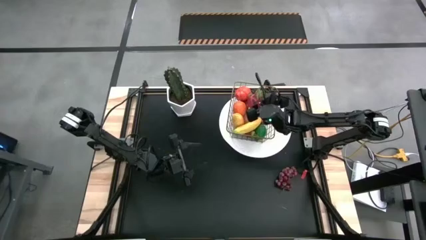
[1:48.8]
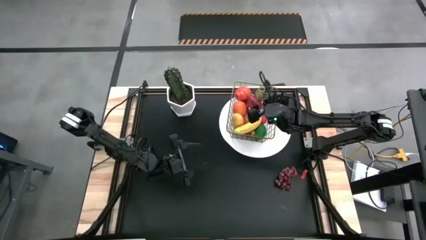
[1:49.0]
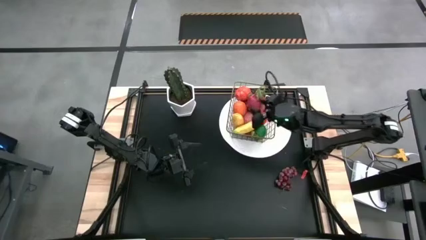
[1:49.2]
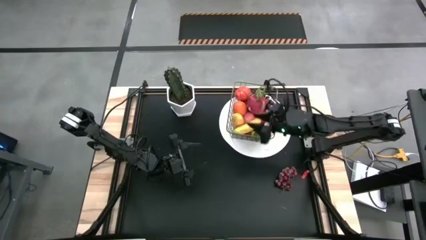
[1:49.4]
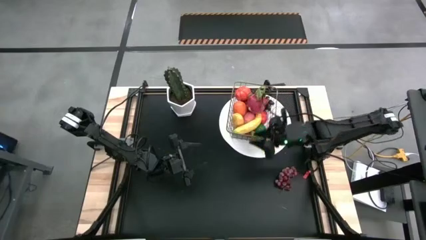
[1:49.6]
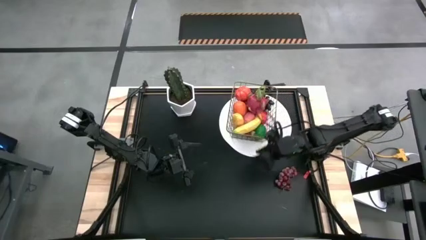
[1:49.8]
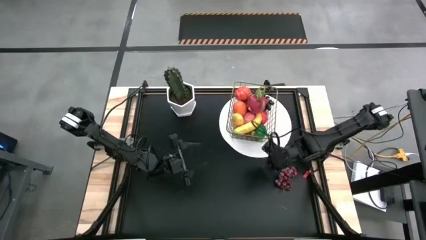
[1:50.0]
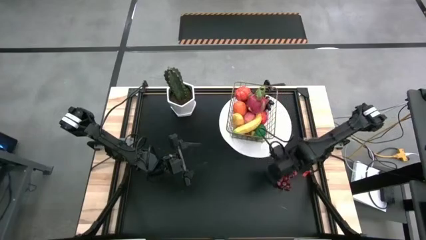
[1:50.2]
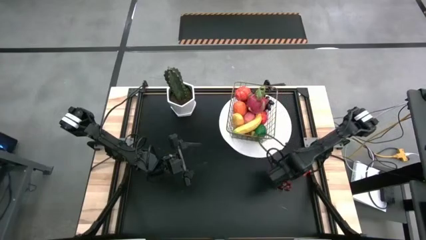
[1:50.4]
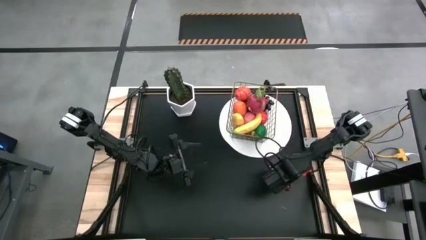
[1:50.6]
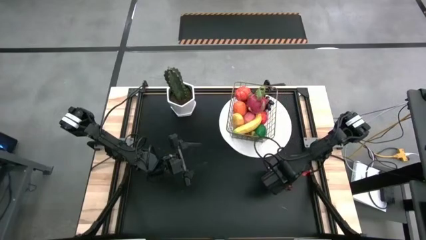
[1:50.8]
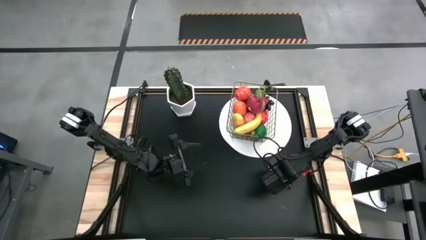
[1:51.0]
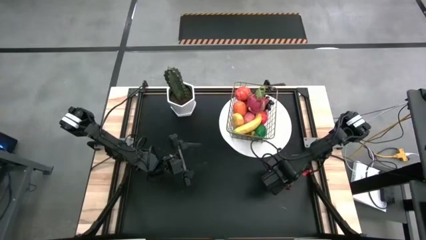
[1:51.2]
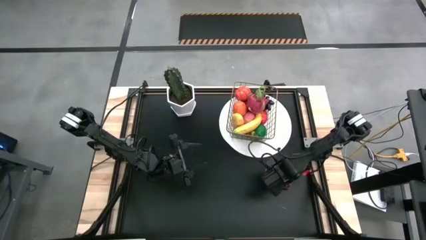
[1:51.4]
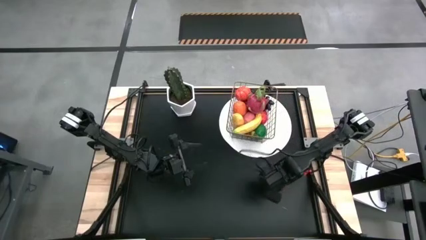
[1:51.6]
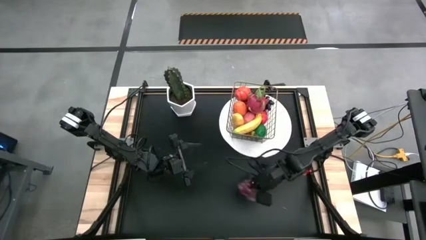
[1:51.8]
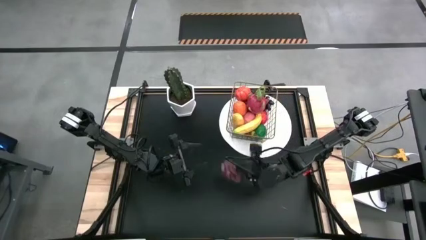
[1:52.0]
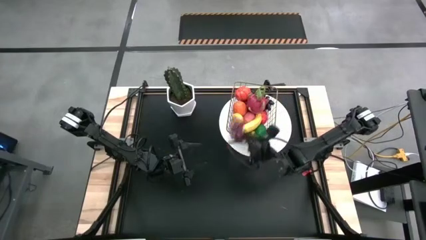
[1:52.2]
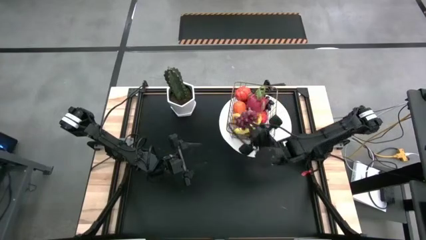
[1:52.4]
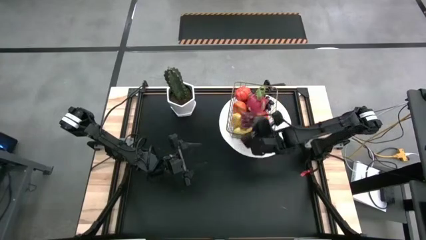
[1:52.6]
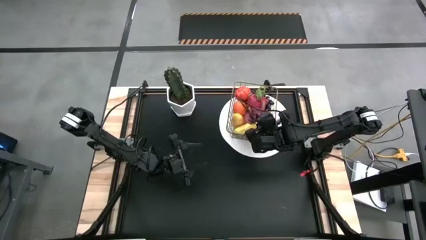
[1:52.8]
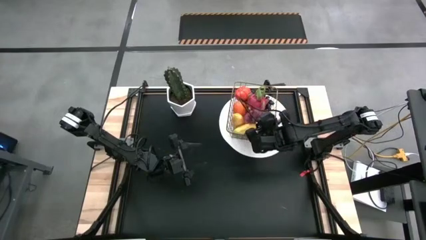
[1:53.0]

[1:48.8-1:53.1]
Task: Build produce basket
Put the purple grapes into the wire basket

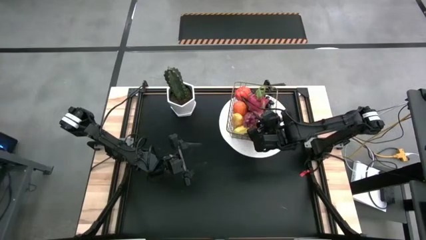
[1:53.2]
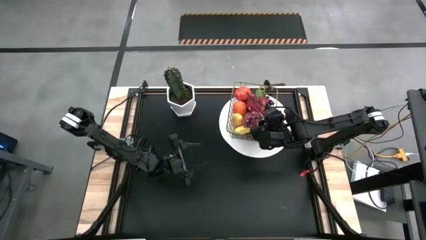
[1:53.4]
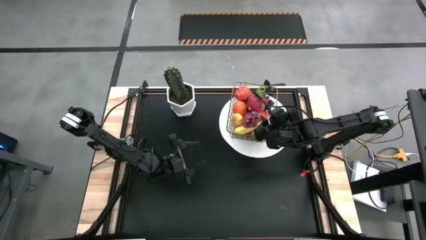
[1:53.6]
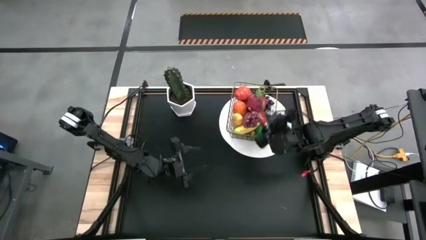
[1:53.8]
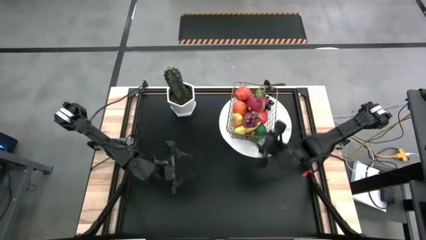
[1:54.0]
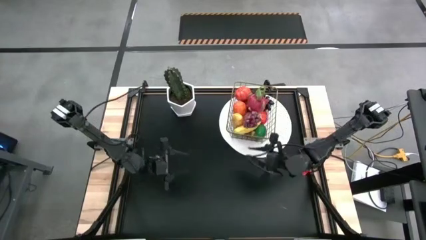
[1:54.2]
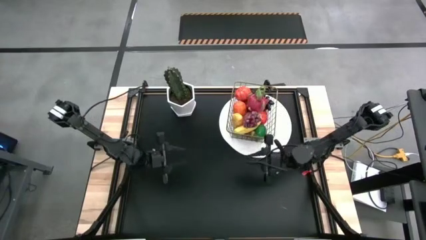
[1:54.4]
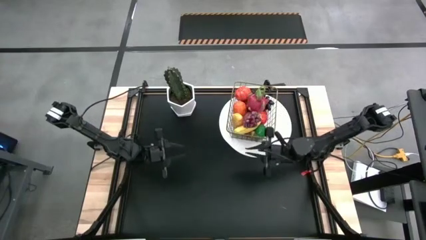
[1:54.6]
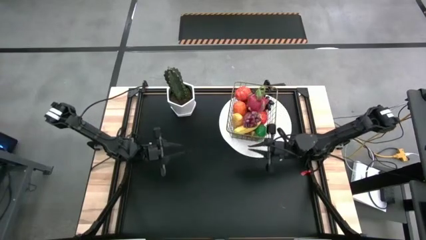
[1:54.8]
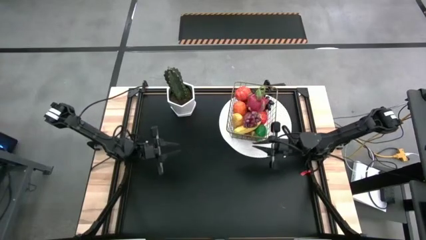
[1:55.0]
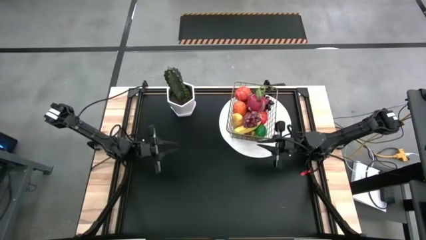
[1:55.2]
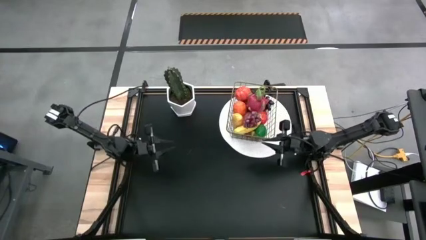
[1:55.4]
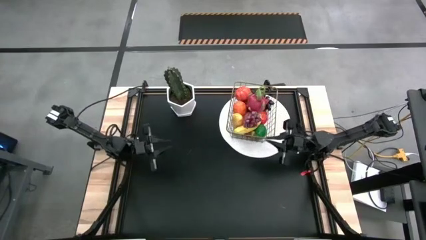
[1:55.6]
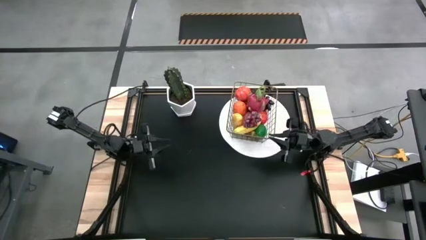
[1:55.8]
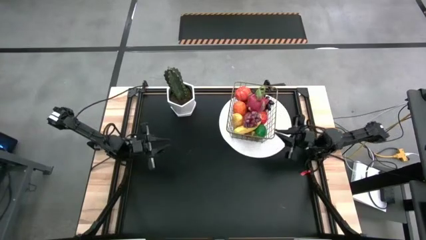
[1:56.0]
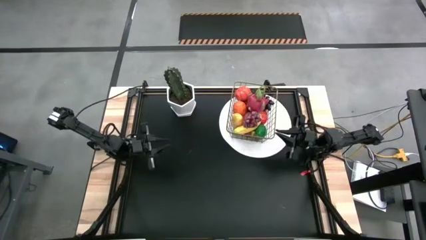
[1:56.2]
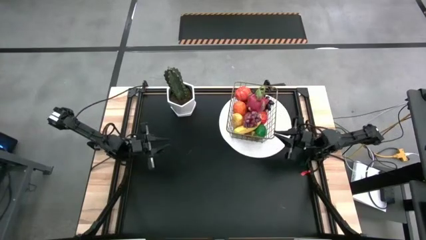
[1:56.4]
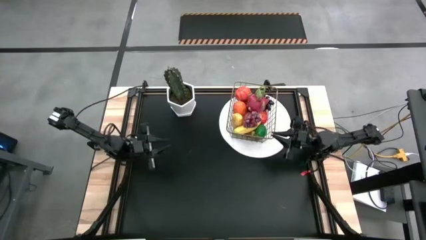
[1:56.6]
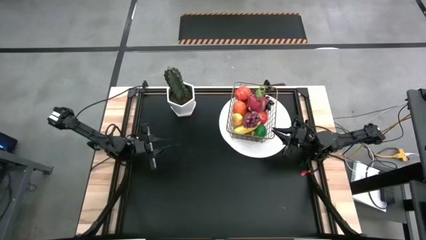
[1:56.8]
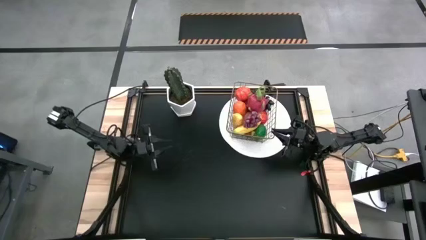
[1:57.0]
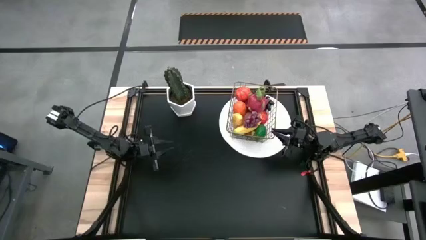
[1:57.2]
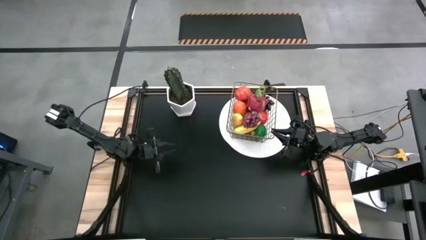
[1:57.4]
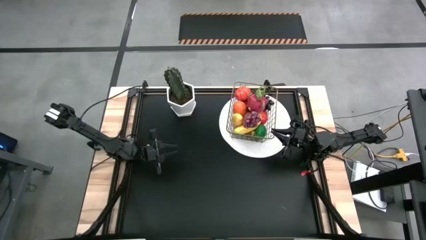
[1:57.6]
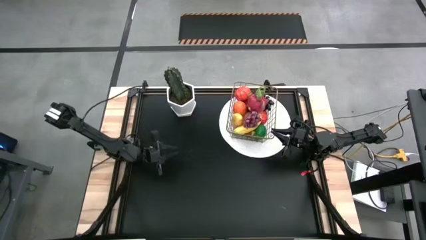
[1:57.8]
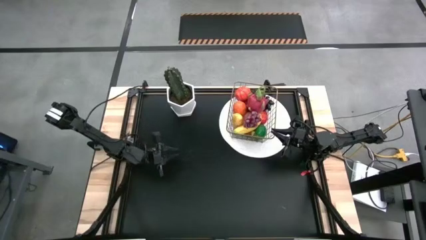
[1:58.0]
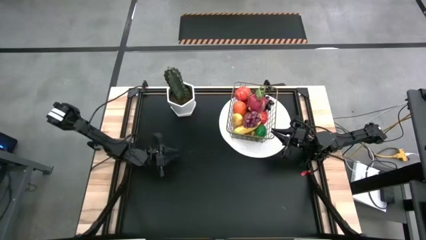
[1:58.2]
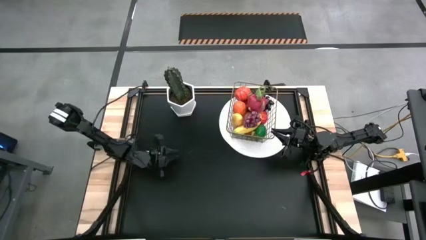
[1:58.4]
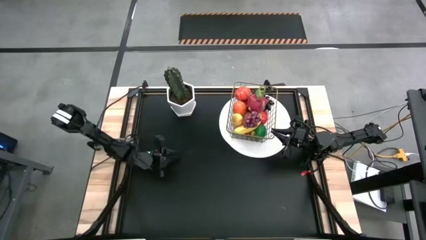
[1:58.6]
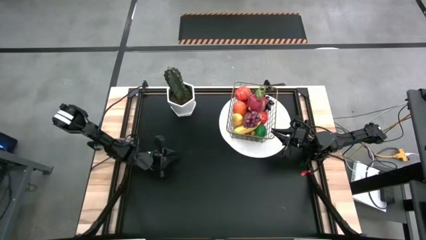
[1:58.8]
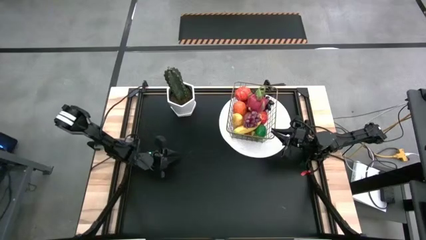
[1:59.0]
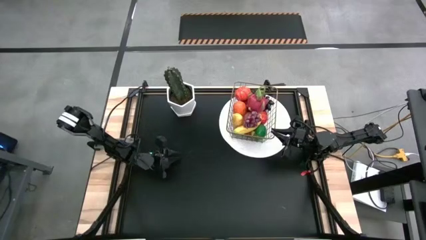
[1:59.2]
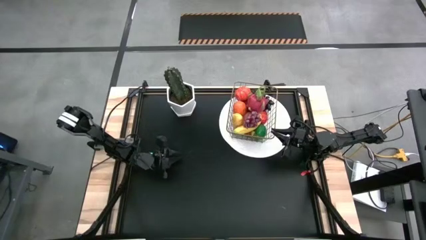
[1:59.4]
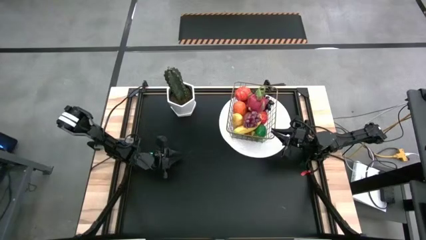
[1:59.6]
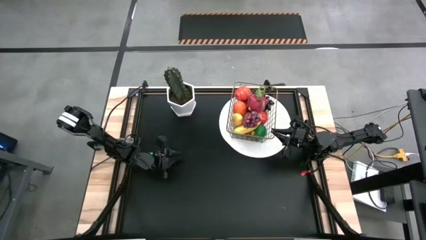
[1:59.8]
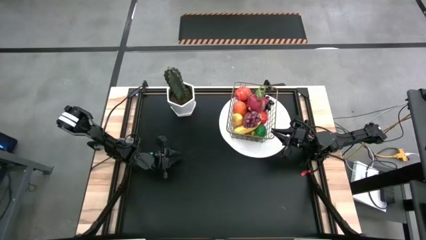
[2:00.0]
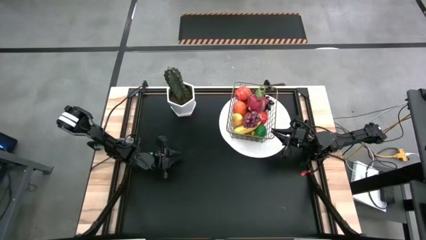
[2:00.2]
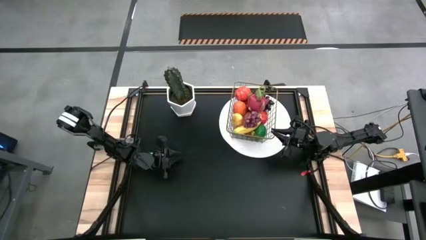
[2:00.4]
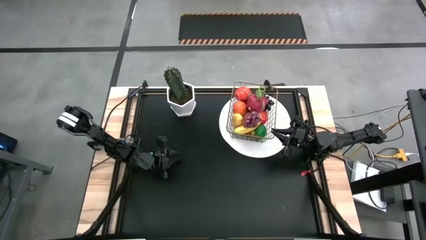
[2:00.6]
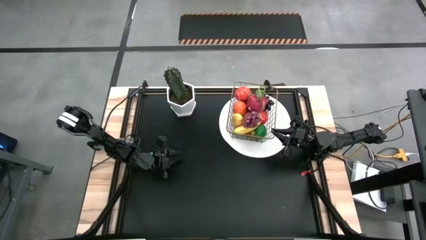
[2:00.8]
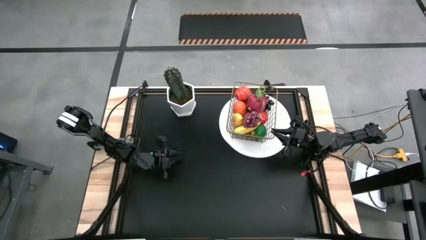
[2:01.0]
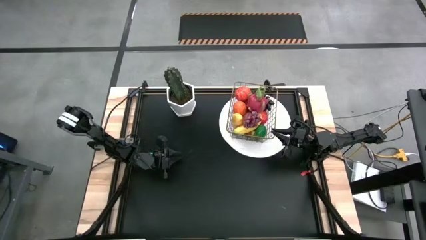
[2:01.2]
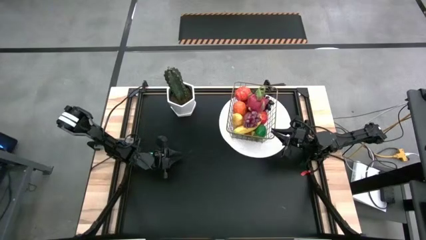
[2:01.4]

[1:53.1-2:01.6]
Return to Home Position

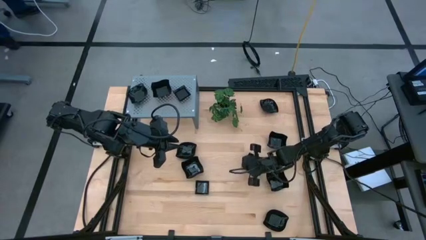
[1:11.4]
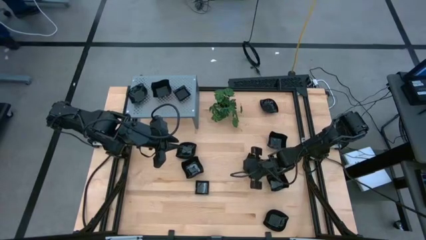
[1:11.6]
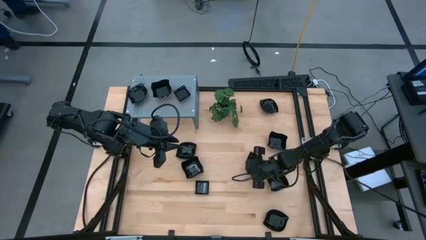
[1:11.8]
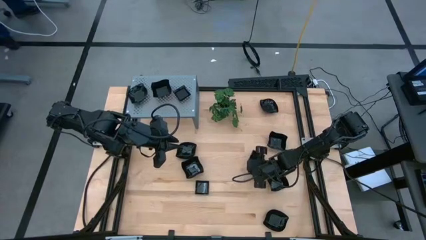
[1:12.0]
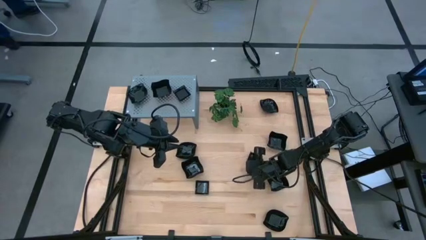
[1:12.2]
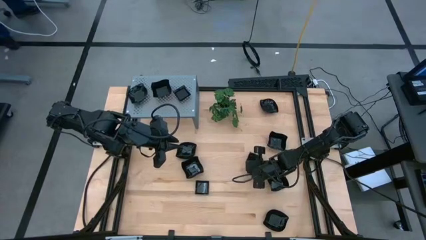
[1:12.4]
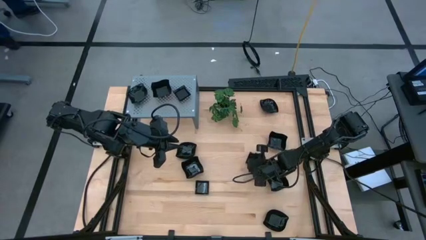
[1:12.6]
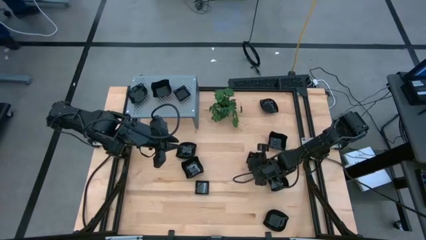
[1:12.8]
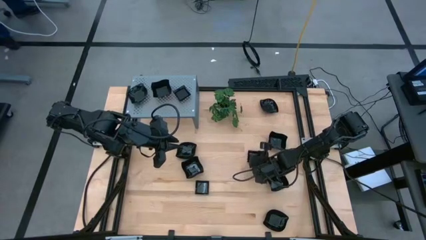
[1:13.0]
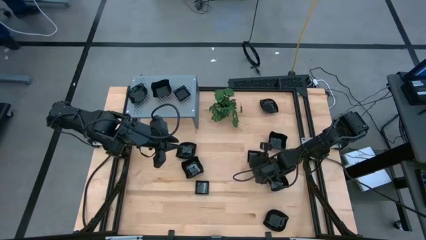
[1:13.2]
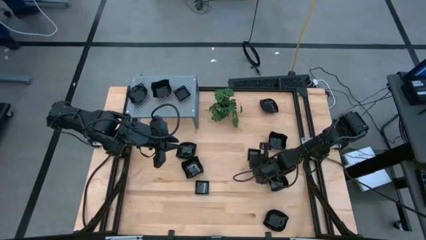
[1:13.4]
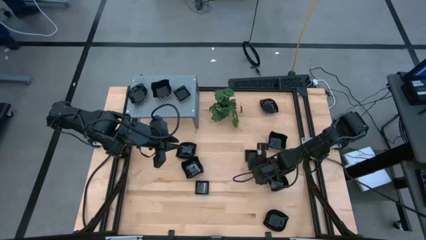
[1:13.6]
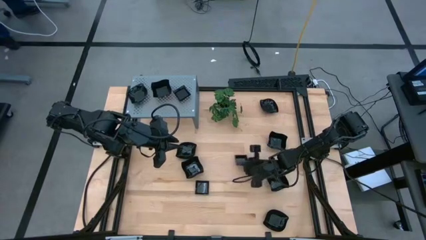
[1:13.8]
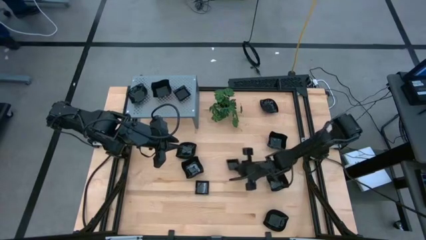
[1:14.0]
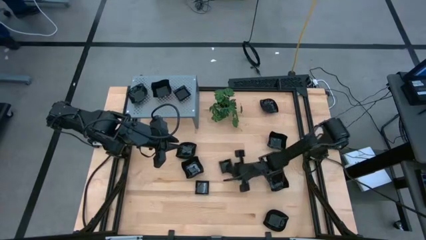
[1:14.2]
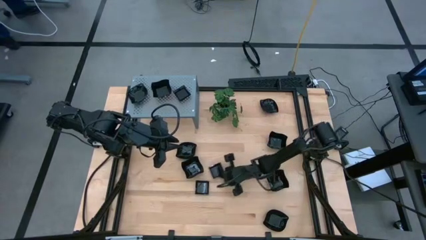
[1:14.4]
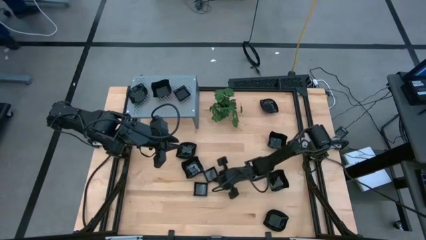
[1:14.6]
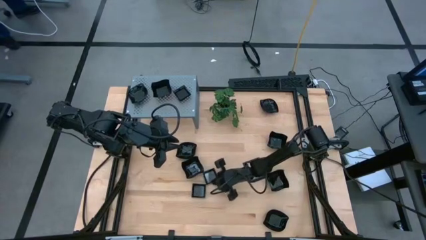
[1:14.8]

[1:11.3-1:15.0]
Task: Pick & Place Mini shaped plates
Move the black square plate to the center of the table
